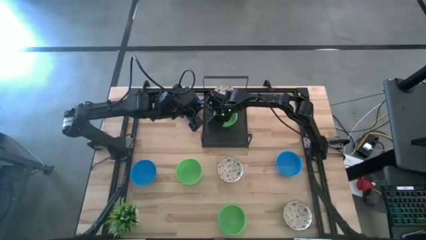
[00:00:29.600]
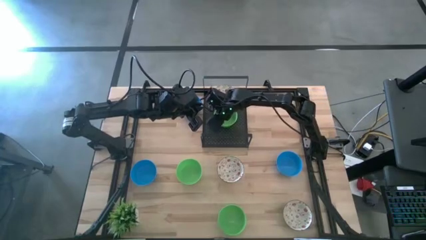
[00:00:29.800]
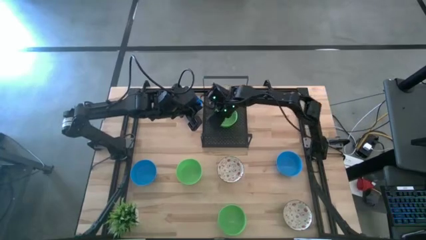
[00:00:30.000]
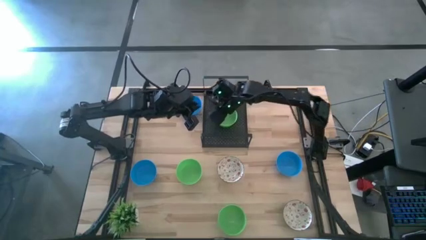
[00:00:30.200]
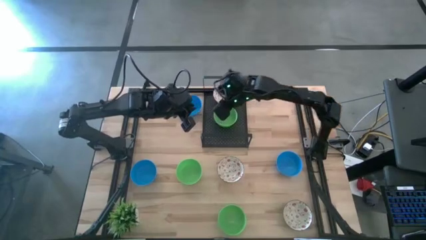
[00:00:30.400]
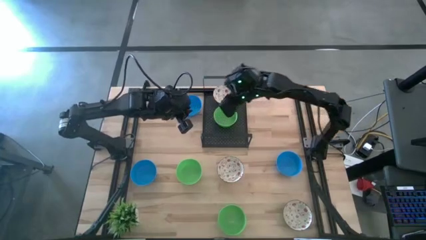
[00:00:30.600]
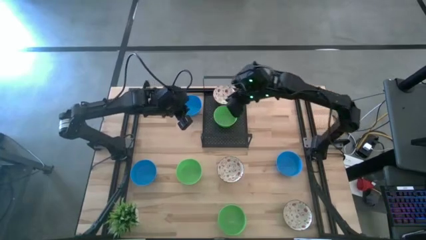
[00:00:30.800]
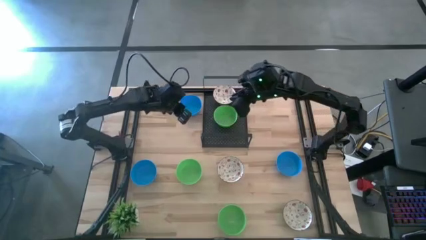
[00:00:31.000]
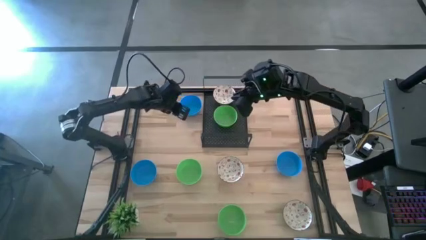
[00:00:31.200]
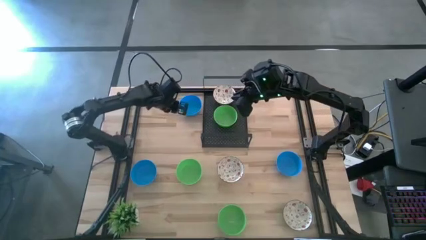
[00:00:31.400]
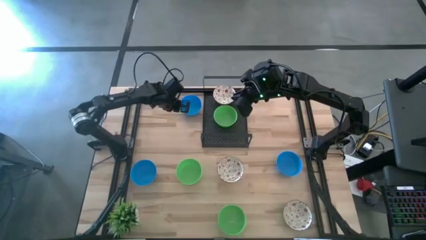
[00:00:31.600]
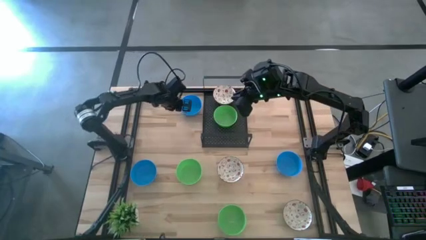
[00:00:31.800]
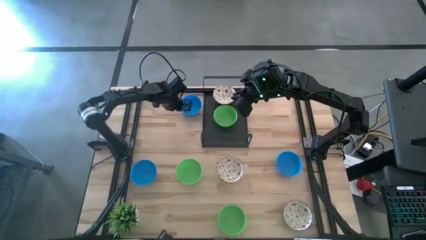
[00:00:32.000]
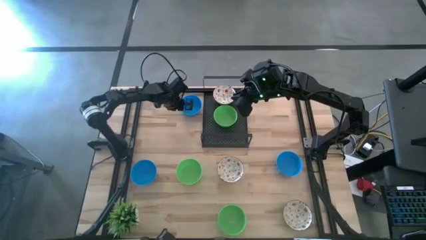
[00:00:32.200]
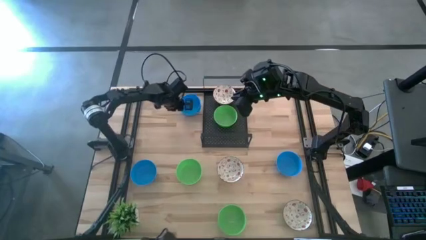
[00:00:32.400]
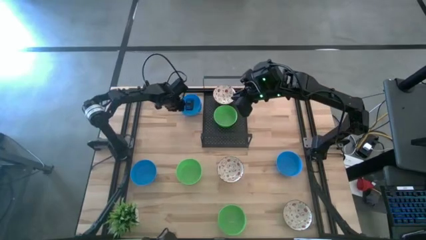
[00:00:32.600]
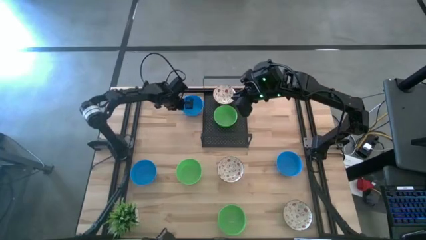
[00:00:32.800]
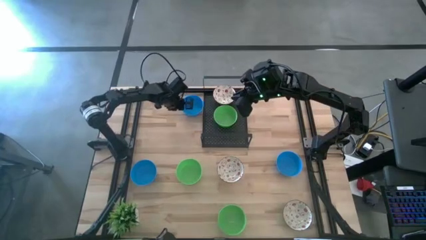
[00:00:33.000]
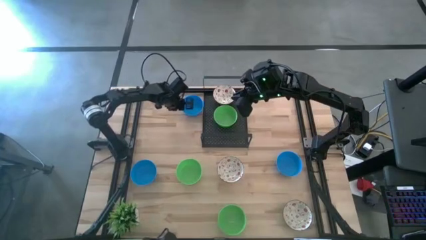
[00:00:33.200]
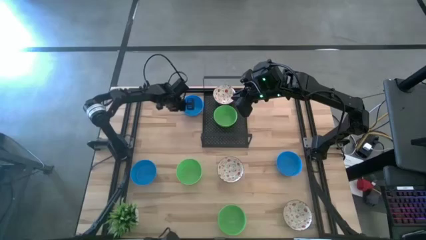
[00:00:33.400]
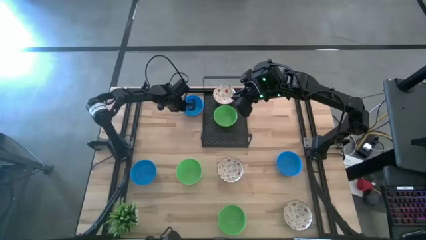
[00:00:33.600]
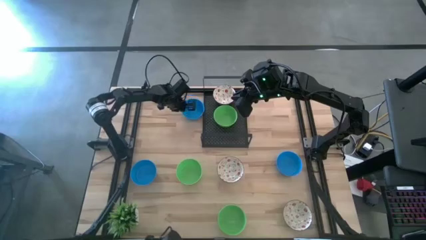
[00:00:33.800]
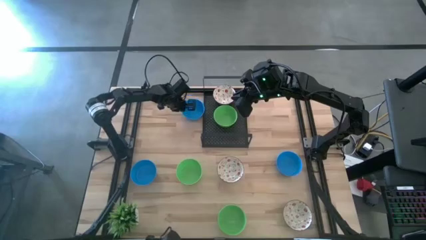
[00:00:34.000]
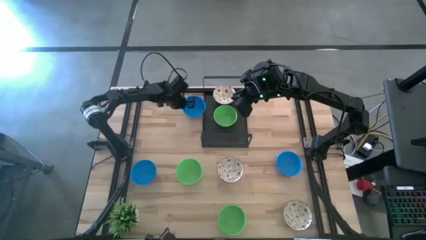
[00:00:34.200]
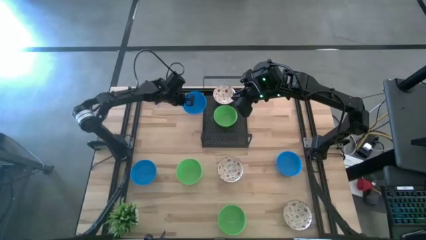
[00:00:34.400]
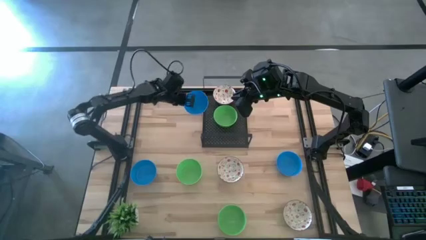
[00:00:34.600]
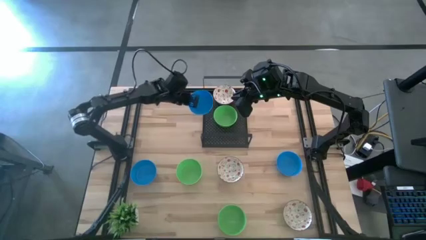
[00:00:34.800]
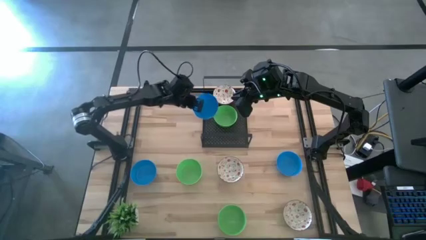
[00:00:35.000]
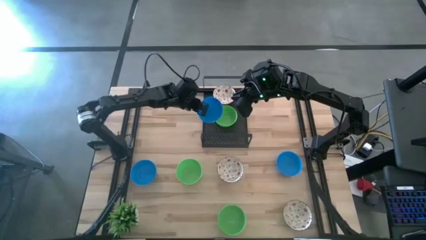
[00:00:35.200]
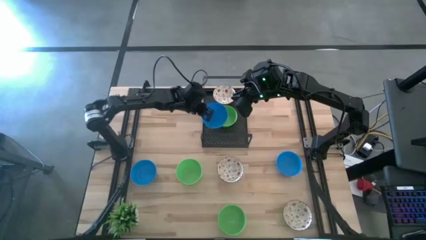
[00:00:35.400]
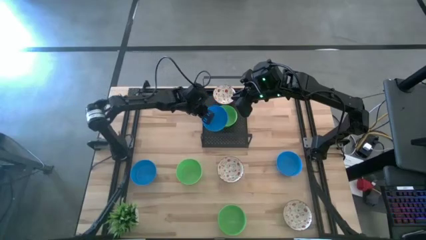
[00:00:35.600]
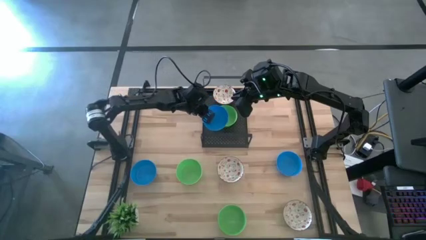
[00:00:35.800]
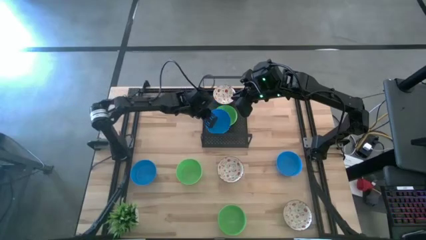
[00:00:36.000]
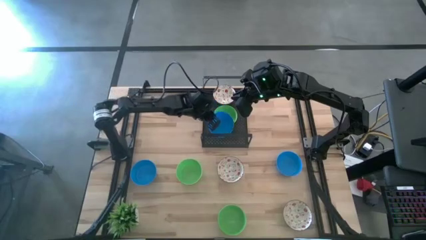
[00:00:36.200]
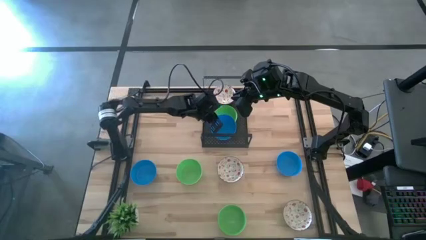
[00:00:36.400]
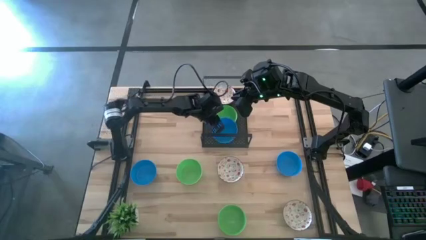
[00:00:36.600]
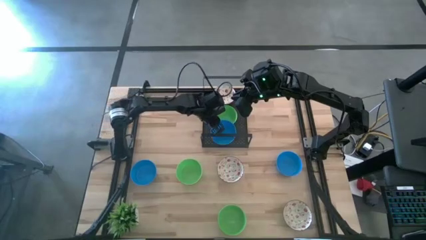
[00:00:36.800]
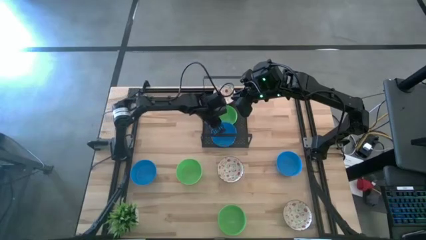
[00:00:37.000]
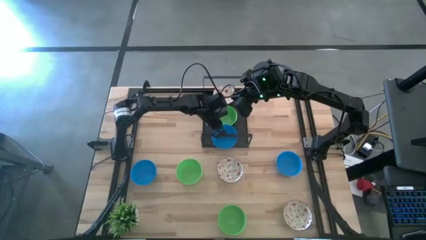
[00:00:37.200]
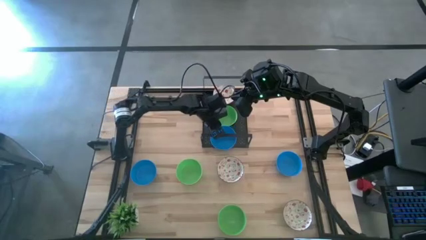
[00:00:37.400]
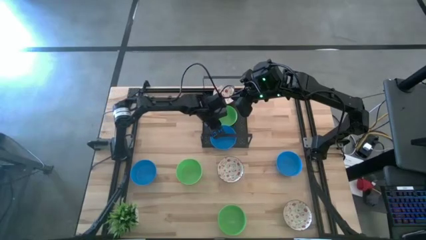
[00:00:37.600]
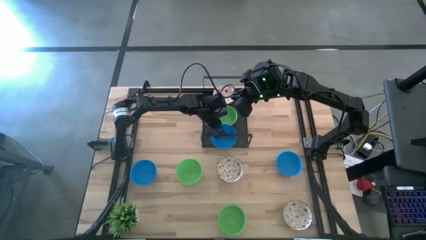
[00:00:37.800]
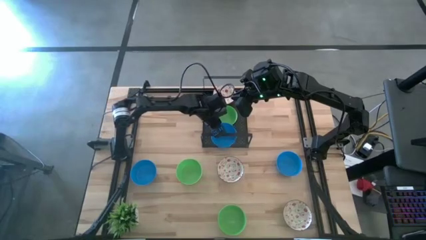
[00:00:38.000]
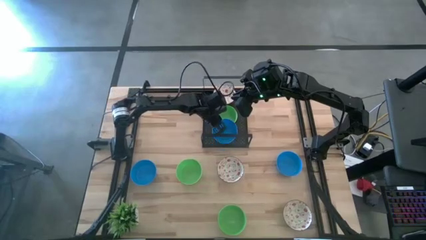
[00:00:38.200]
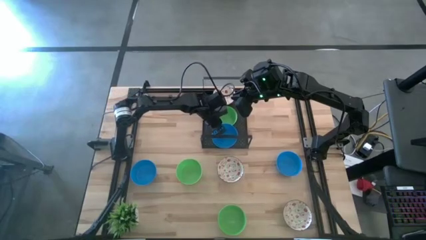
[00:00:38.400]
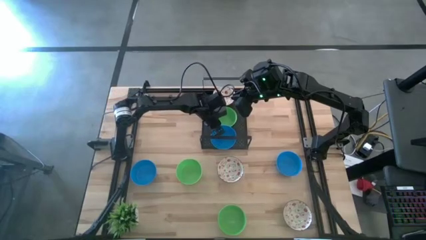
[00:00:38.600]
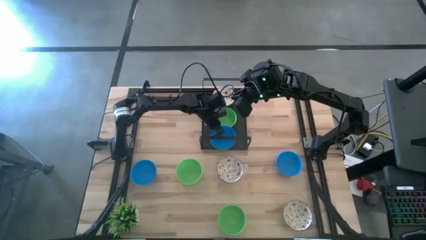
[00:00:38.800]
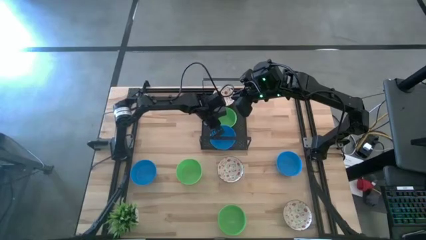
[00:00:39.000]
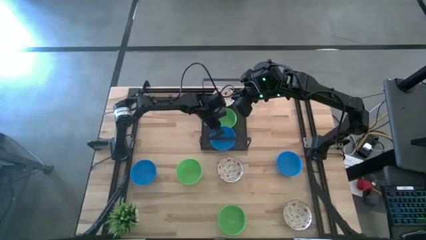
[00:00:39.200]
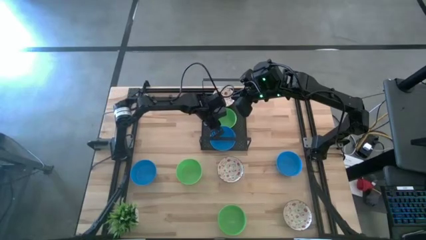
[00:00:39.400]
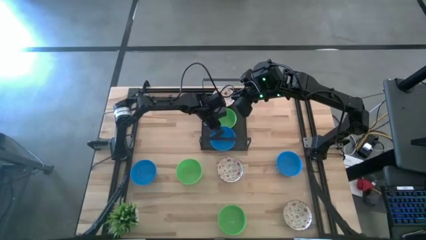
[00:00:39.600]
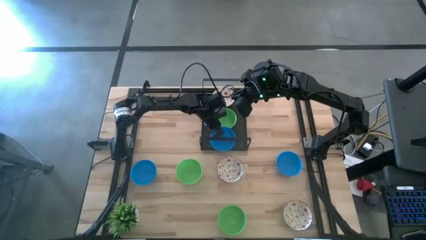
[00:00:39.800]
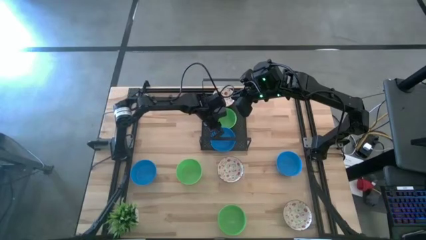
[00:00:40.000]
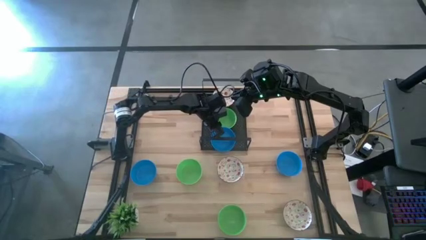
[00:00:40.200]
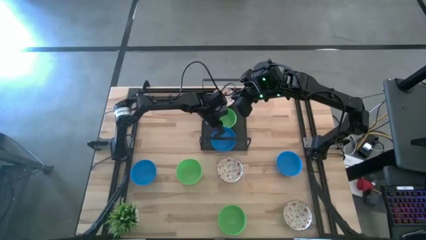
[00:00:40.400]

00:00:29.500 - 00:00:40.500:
Task: Pick & Place Mini bowls
Put the top blue bowl on the shelf

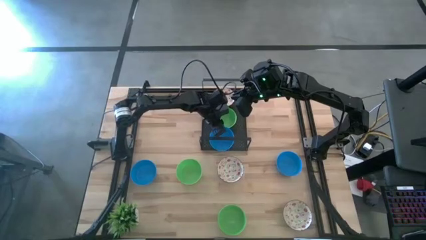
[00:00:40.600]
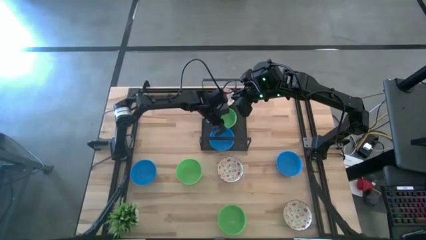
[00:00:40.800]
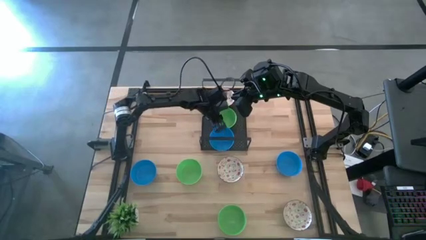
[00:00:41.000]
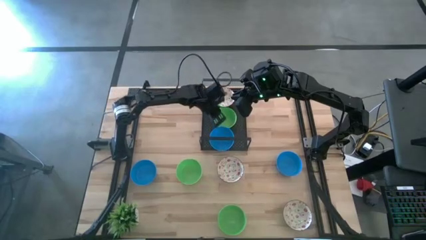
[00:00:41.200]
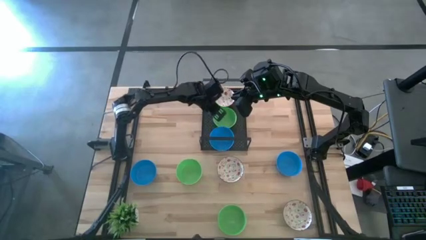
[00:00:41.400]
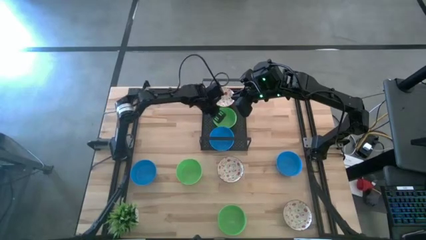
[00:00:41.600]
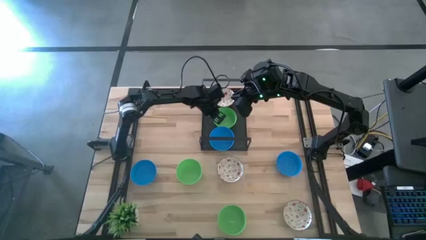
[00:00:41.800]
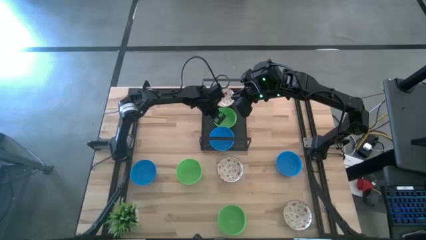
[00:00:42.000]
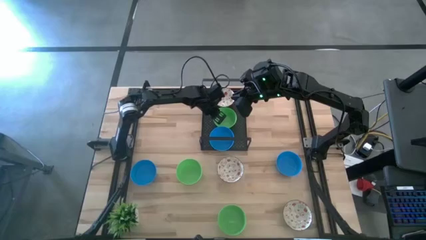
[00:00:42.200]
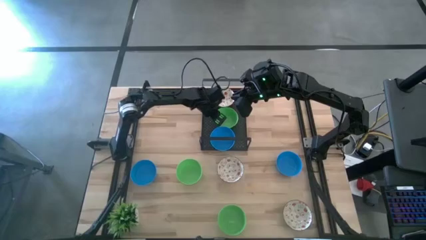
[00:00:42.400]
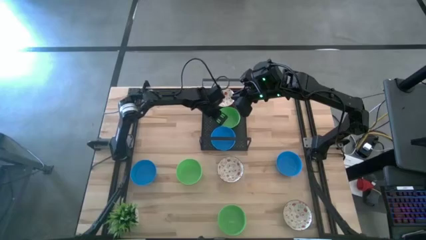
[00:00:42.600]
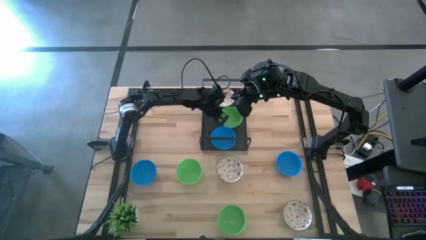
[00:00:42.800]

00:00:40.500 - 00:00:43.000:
Adjust the green bowl on the shelf
